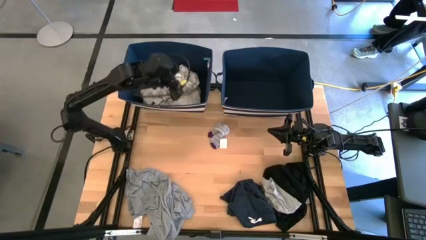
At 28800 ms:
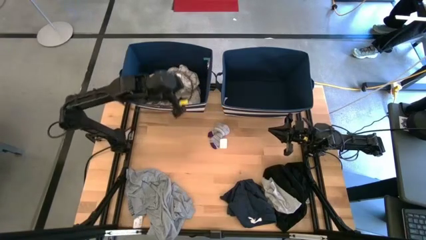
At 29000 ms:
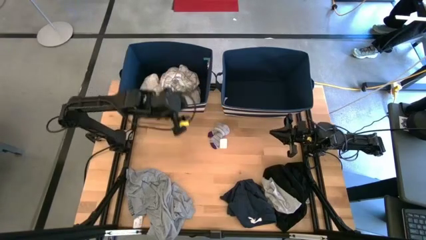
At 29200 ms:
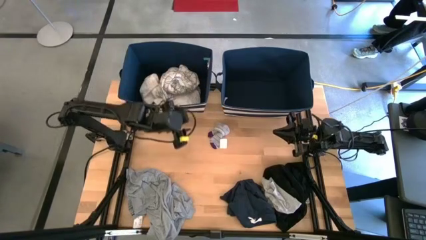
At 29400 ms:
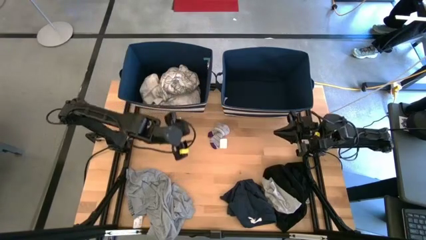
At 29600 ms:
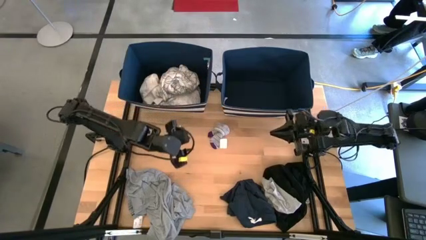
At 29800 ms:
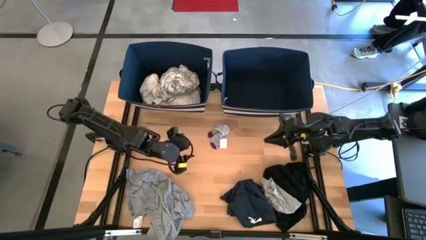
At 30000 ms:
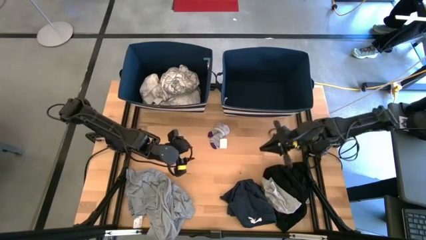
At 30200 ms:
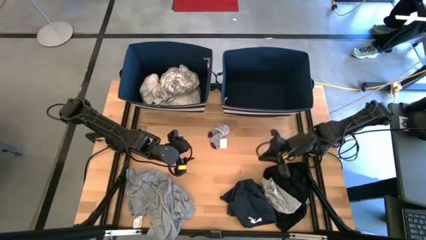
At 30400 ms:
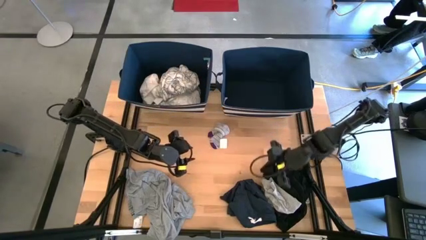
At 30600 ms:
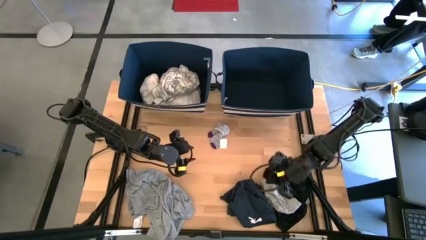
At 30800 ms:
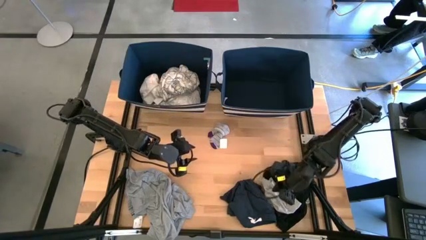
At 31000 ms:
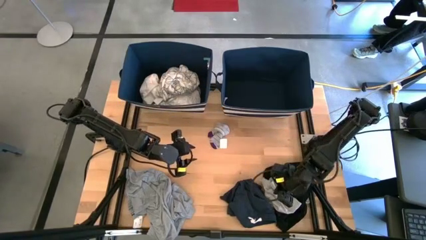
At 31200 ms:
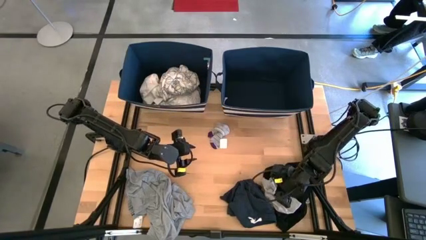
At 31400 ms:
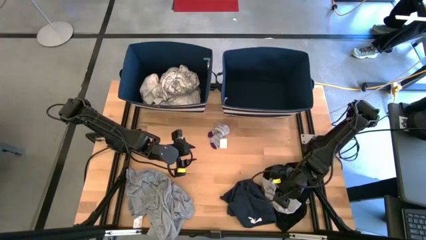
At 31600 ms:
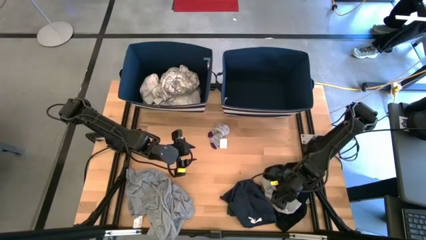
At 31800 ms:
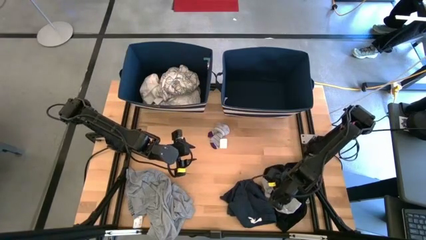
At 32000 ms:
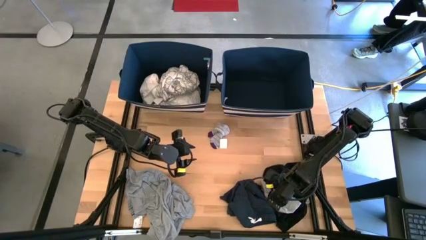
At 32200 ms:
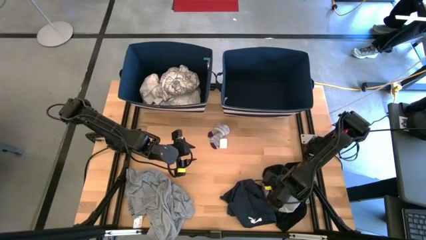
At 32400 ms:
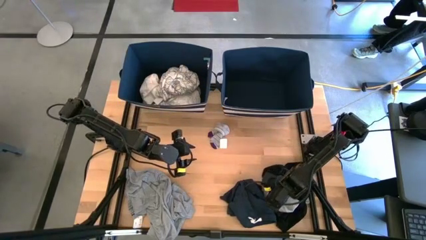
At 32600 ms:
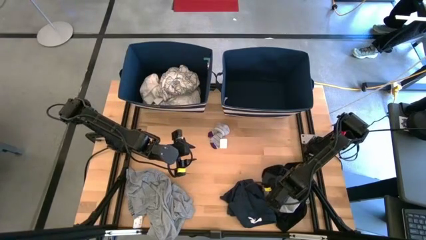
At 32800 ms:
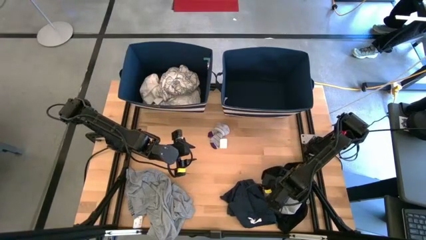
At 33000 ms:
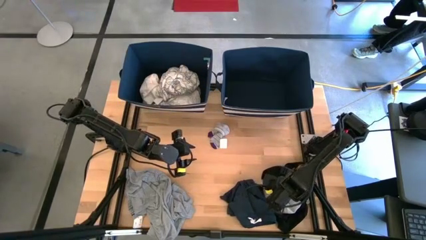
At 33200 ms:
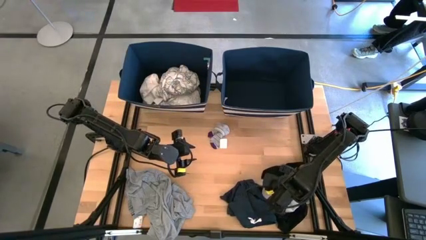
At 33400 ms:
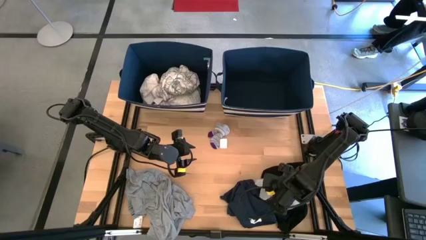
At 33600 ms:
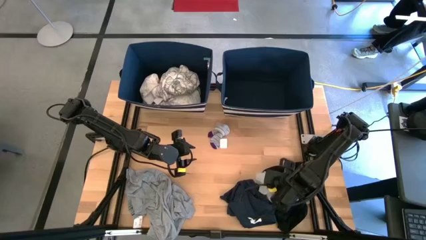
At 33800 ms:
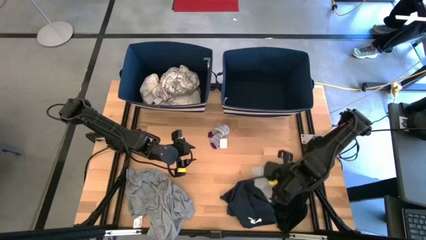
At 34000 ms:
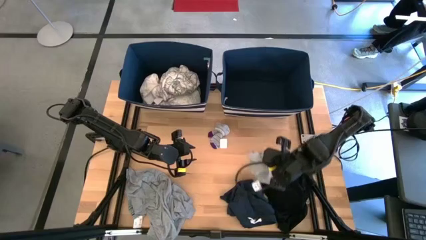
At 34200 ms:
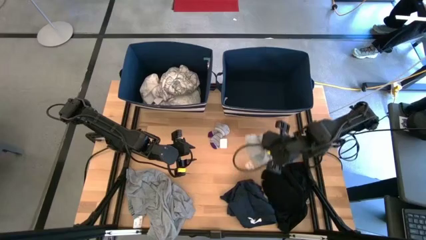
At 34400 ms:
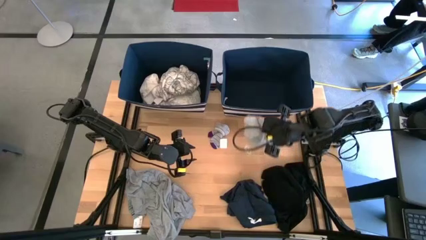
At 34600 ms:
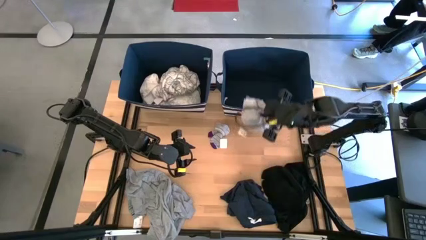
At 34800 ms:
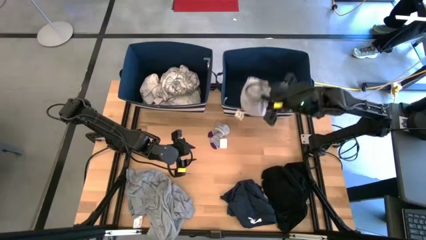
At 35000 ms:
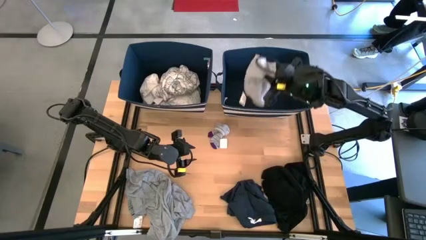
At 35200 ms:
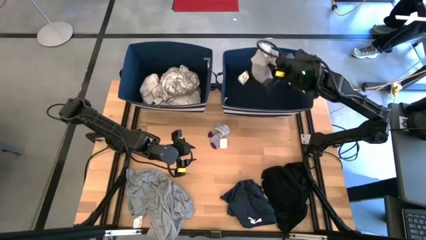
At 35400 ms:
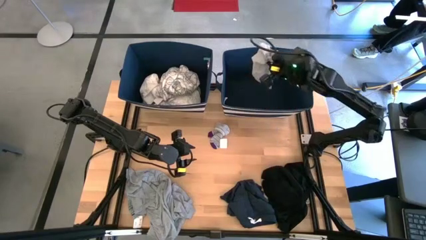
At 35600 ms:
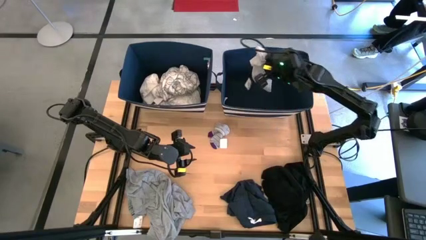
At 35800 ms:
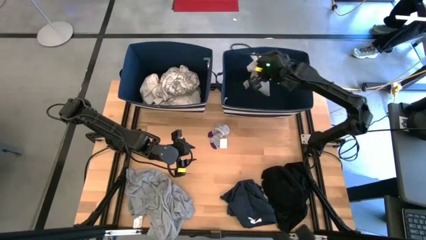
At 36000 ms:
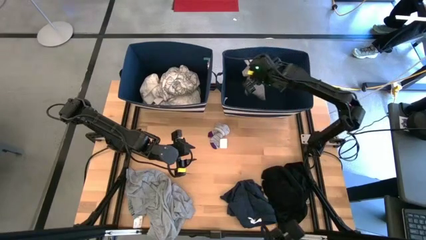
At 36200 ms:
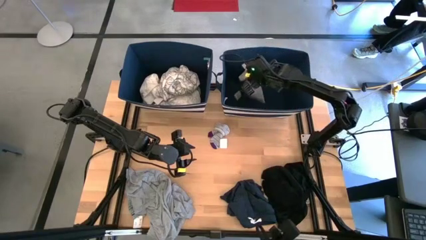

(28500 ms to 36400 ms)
Task: Sort clothes
Put the gray shorts into the left laundry organizer

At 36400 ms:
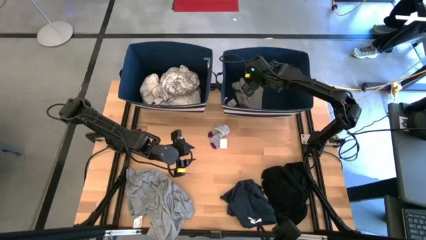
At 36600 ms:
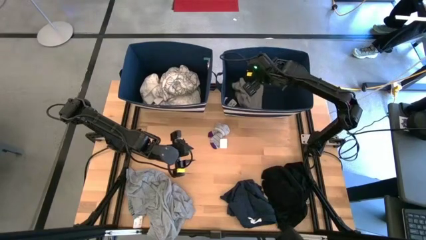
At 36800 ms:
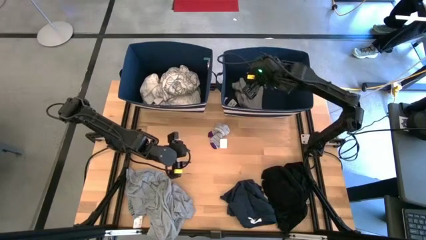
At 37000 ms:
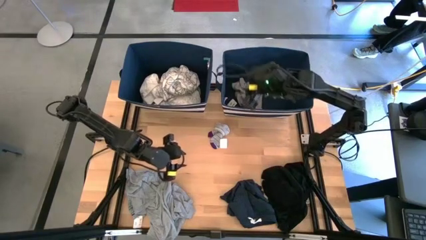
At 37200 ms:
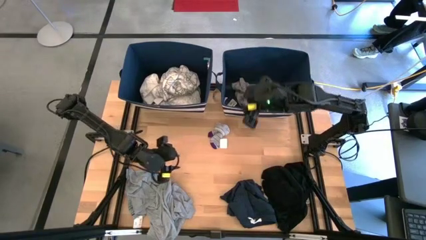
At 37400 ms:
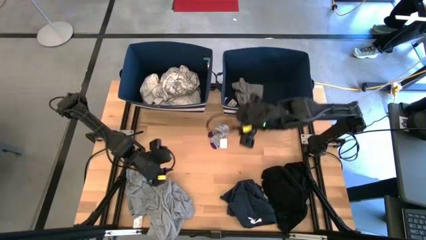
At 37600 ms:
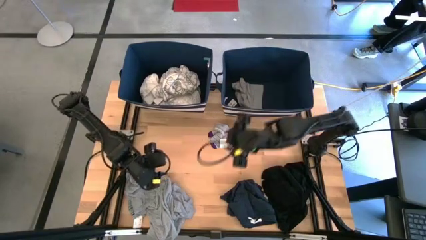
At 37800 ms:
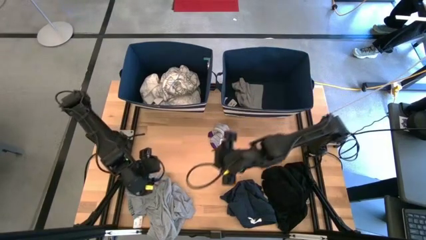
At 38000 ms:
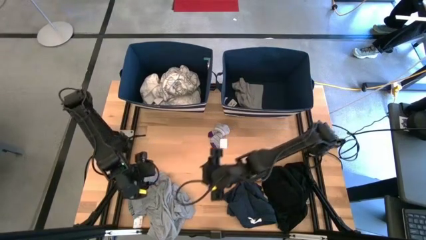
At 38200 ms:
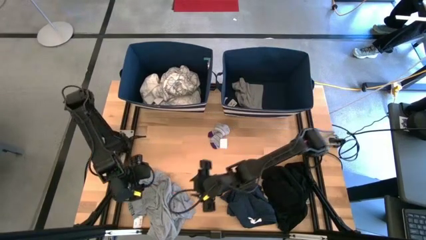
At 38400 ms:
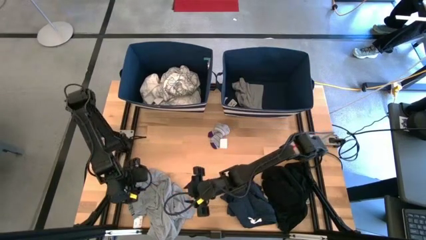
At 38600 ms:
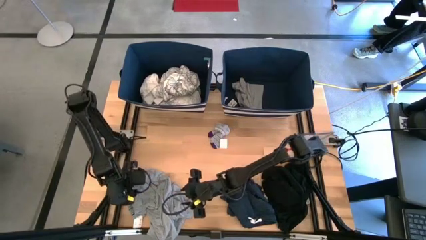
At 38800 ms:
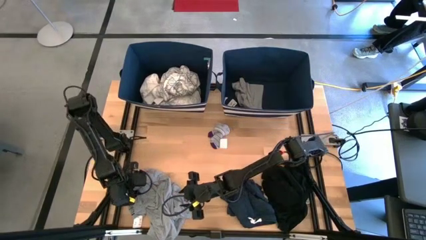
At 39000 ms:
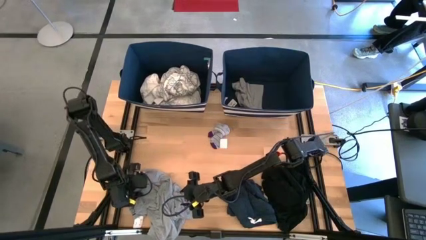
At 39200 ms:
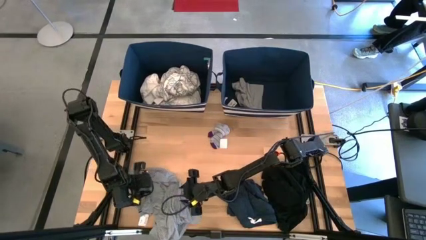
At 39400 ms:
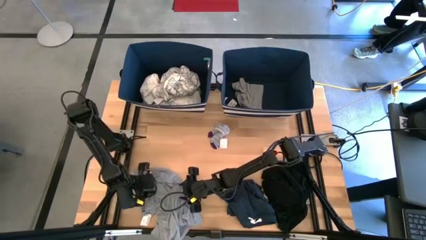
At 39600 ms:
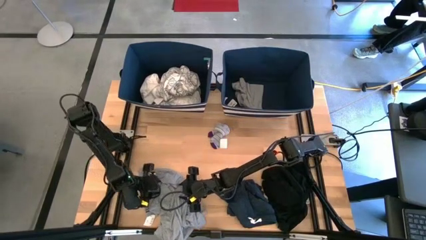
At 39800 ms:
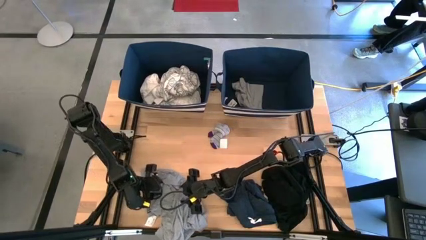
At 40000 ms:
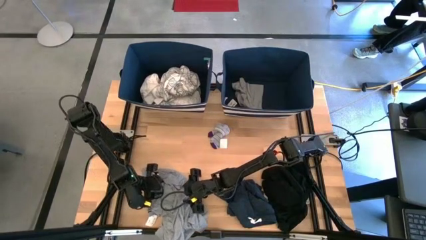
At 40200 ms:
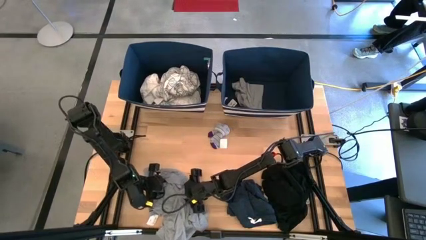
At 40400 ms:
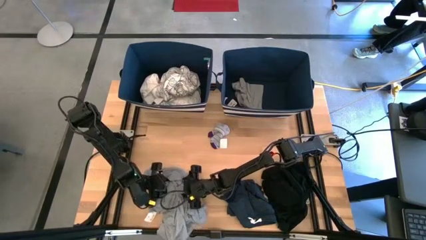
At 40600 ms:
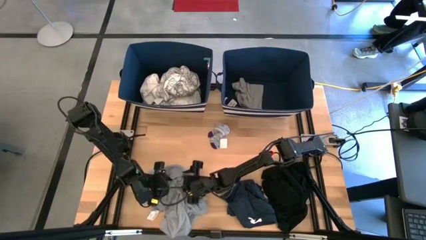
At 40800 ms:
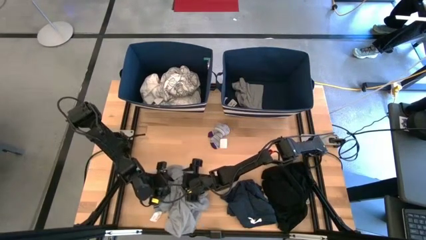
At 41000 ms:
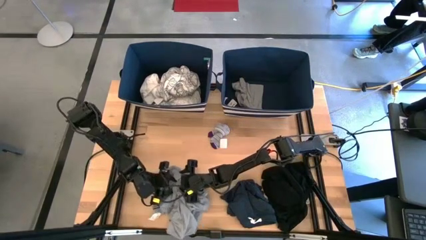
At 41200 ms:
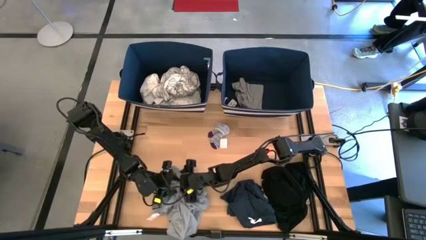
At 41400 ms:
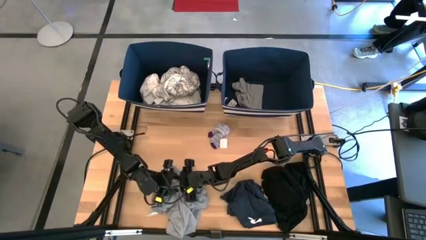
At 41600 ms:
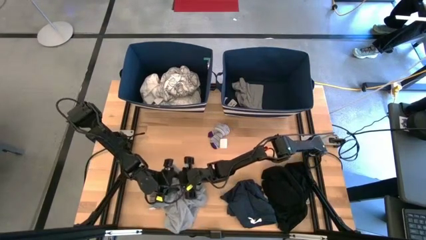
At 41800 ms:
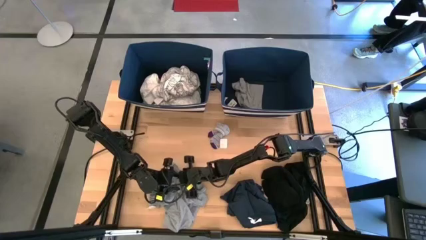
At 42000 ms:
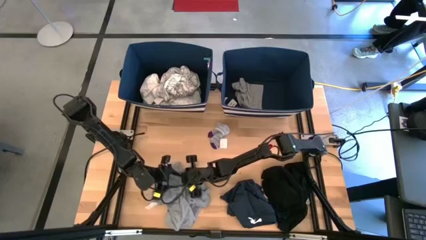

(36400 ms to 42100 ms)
Put the grey clothing into the left bin

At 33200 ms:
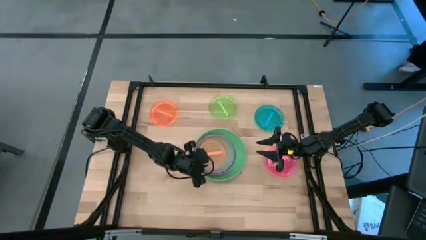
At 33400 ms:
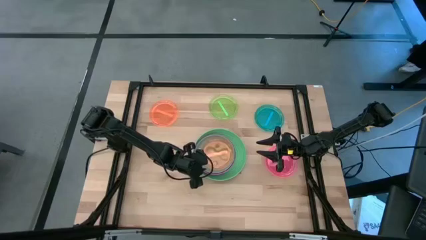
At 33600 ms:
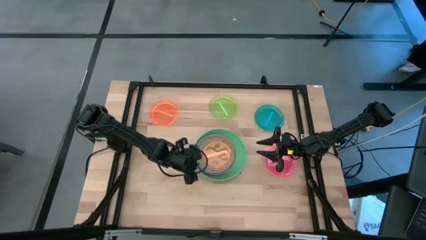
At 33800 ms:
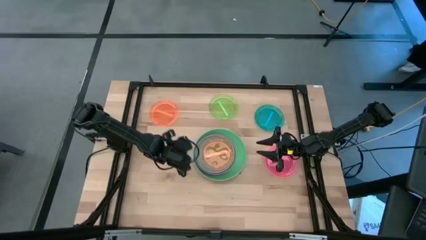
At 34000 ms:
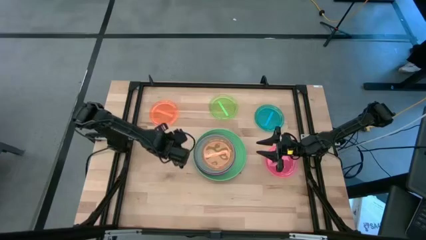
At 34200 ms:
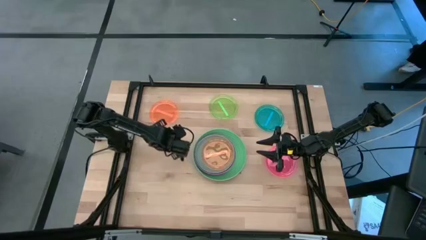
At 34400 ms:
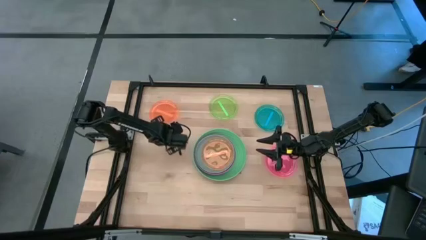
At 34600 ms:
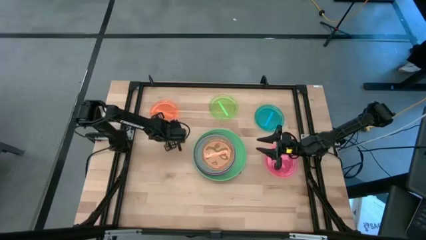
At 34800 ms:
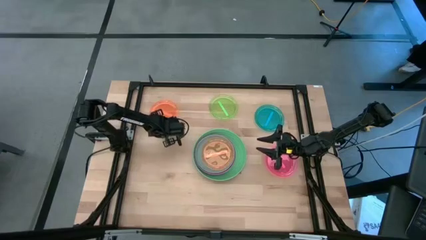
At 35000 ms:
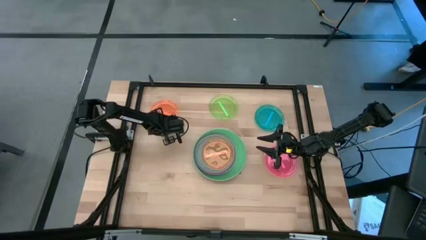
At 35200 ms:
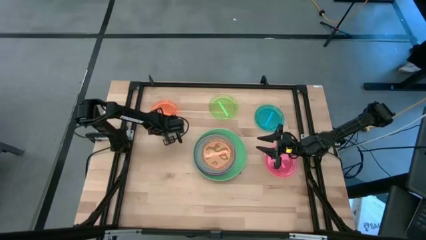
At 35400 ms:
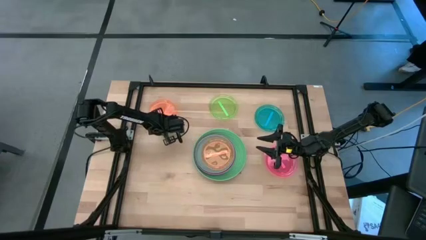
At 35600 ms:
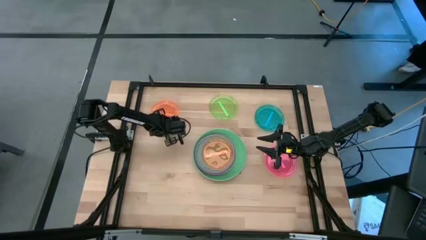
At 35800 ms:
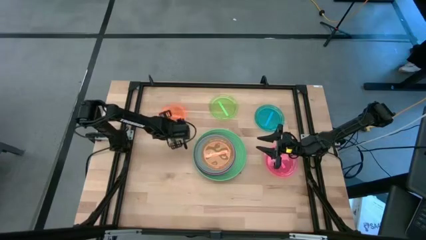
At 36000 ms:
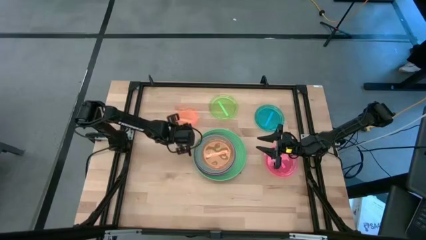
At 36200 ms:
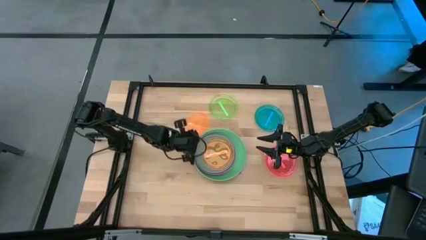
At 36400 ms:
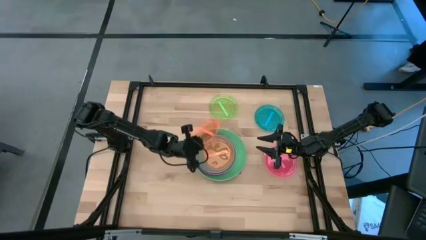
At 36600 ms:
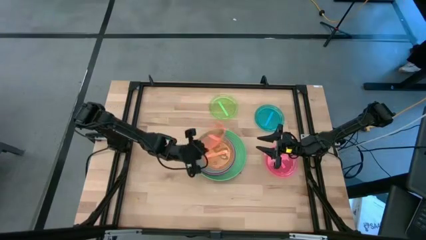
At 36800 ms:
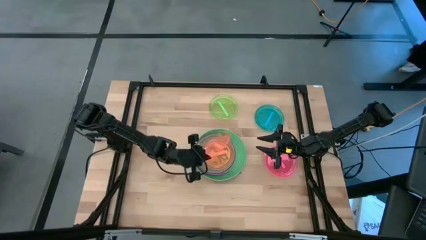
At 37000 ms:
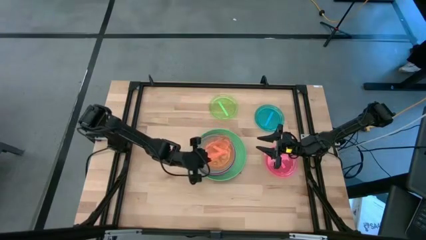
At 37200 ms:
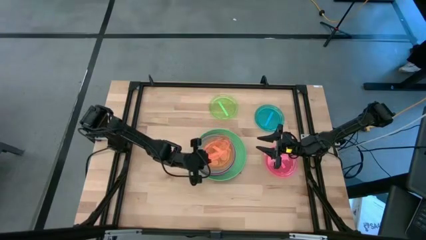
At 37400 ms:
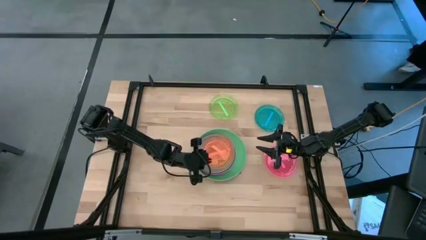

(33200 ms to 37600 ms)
Task: Stack plastic plates
Stack the orange plate on top of the orange plate
